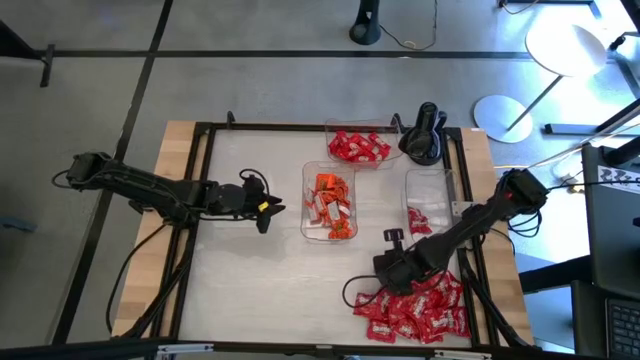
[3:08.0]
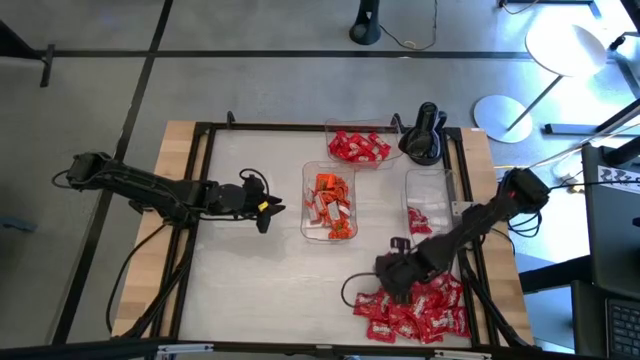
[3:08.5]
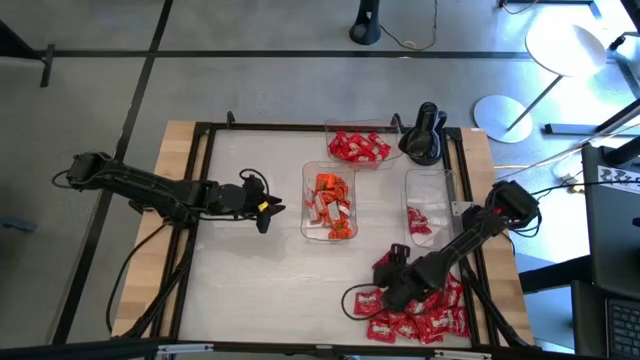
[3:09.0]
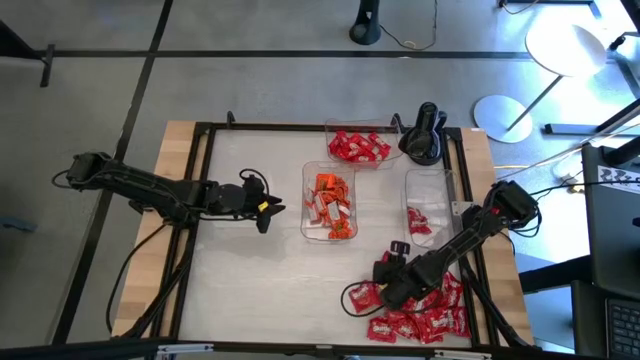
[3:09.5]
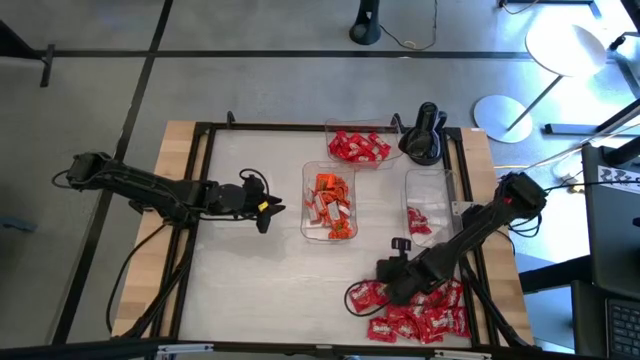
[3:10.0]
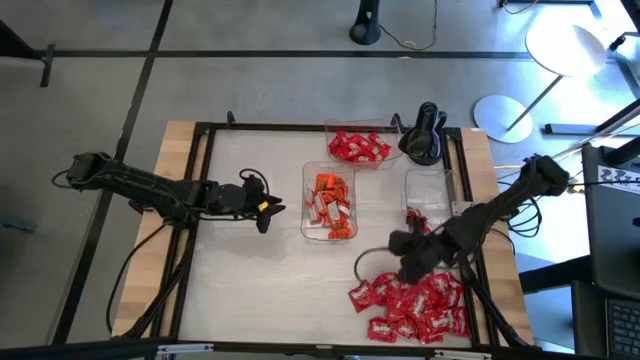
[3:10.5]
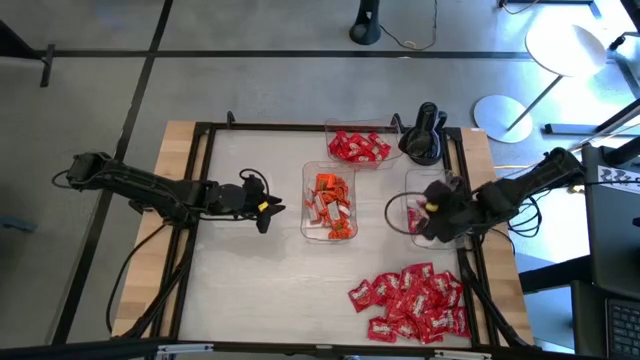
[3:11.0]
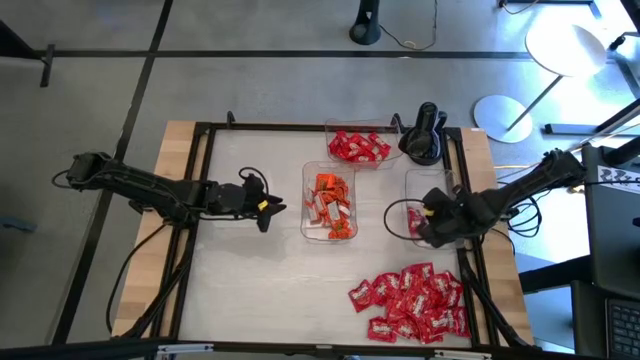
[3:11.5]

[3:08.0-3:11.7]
Task: Sort candy
Put the red candy pack into the bottom right transparent bin

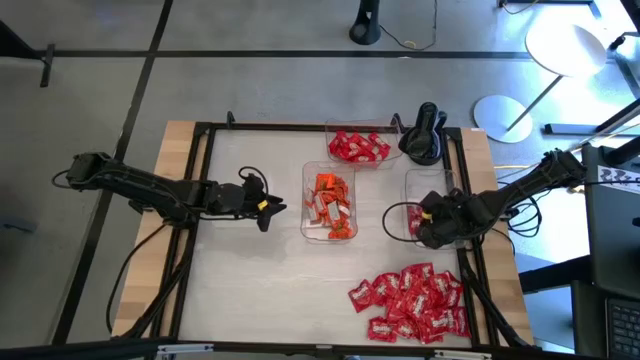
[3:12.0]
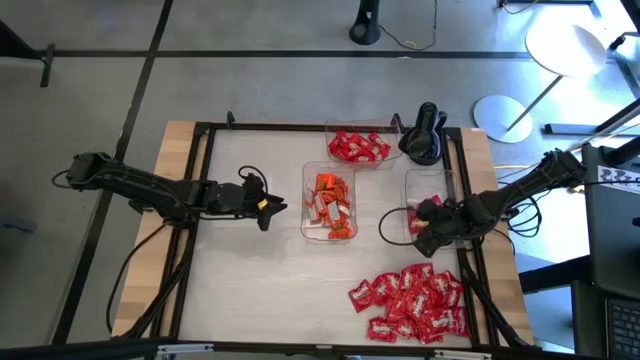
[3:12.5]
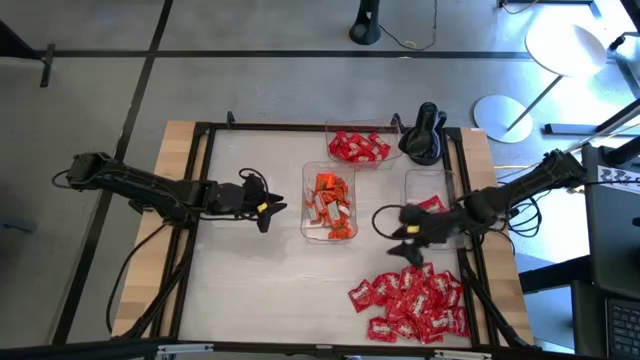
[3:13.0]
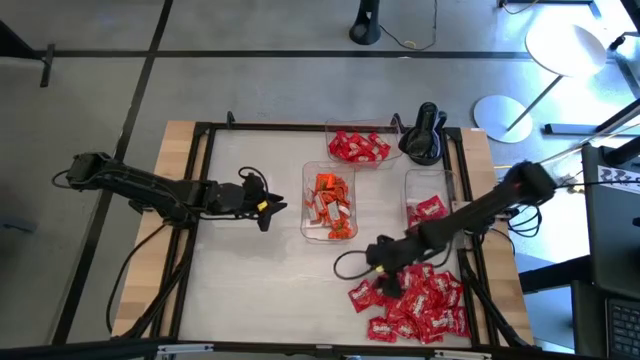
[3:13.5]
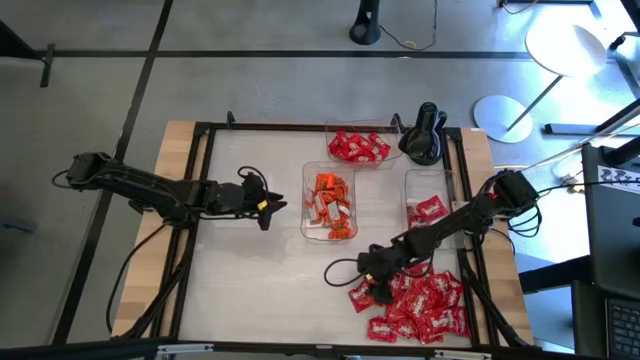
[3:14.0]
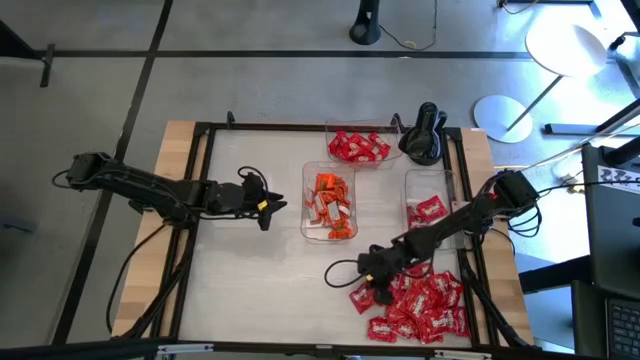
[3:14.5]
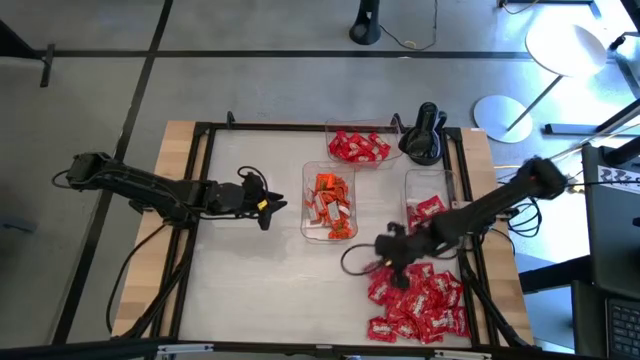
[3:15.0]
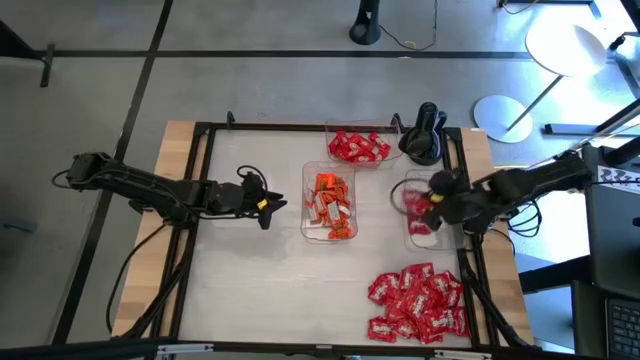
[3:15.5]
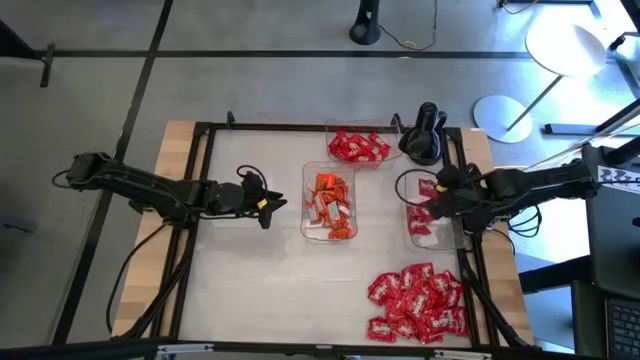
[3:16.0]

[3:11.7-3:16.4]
Put the red candy pack into the bottom right transparent bin

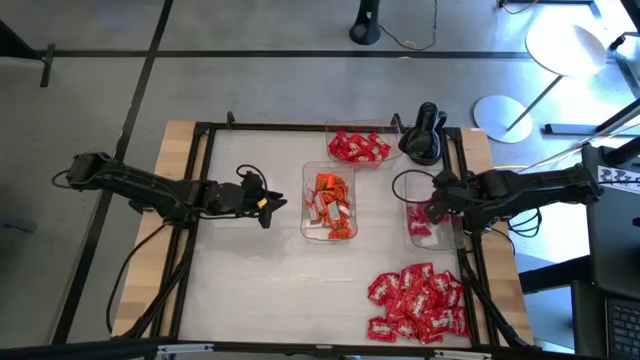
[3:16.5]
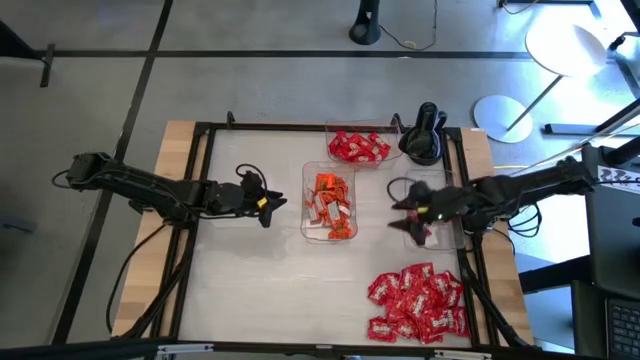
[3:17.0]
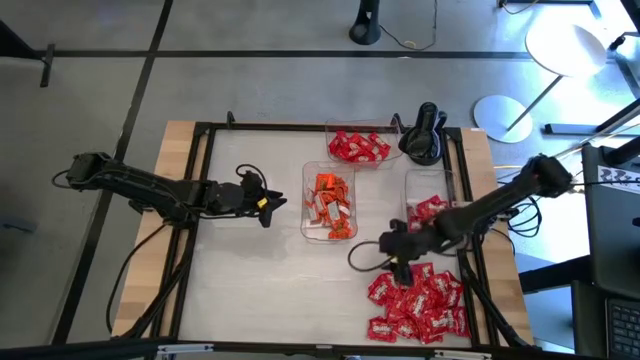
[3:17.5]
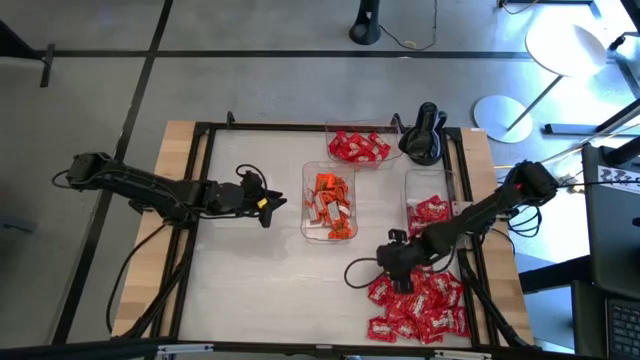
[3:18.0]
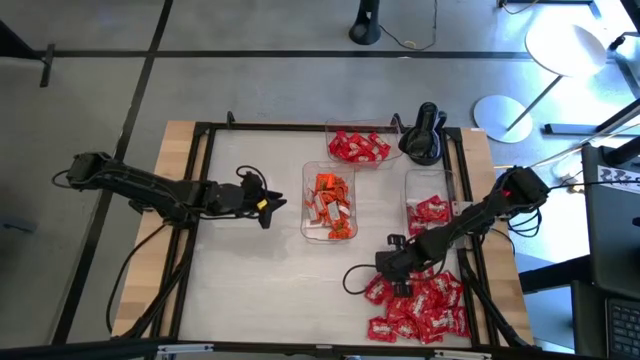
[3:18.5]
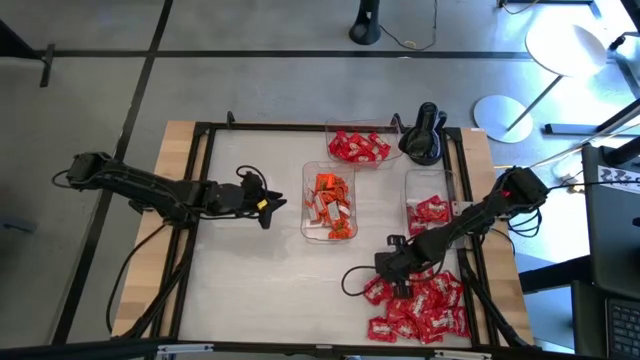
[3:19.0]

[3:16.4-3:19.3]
Put the red candy pack into the bottom right transparent bin

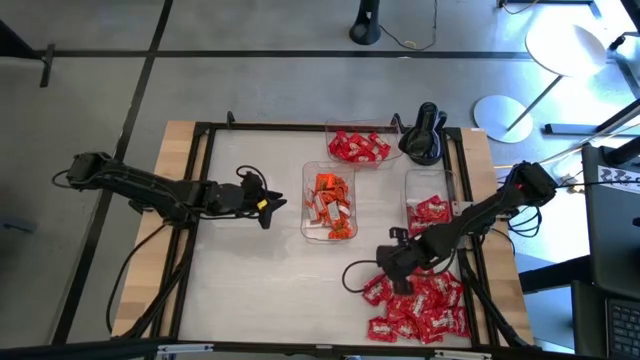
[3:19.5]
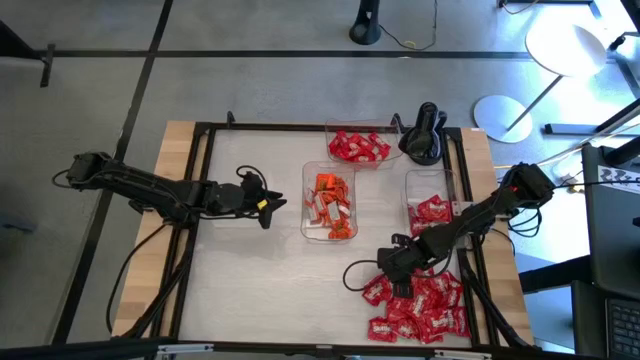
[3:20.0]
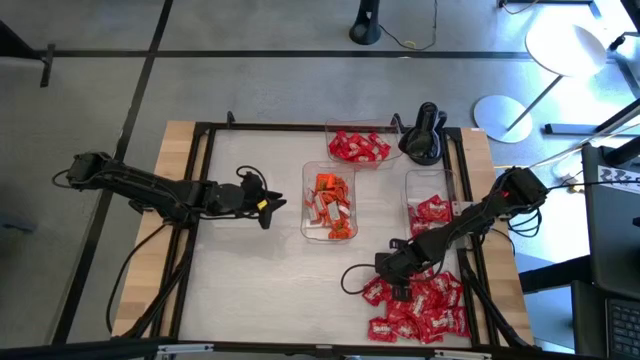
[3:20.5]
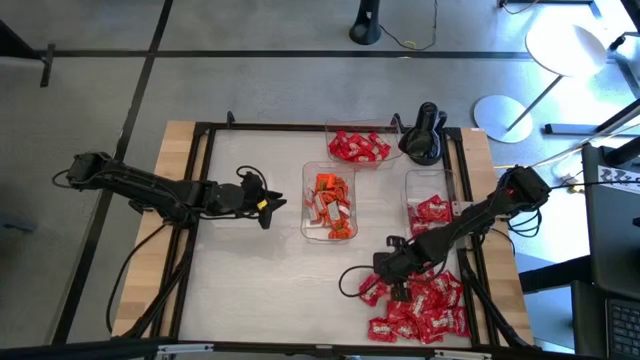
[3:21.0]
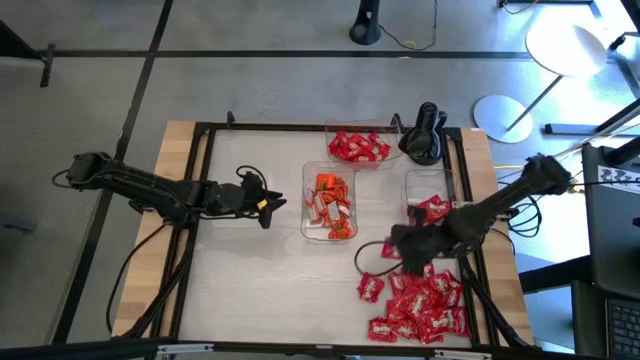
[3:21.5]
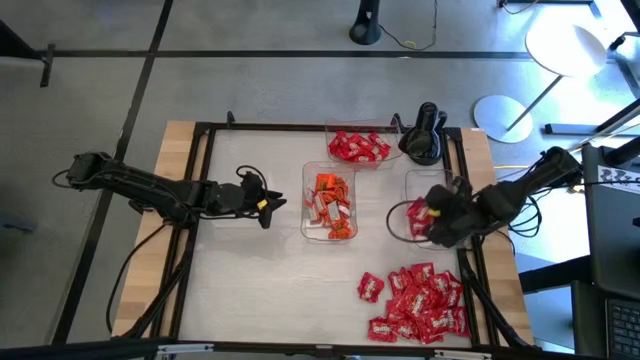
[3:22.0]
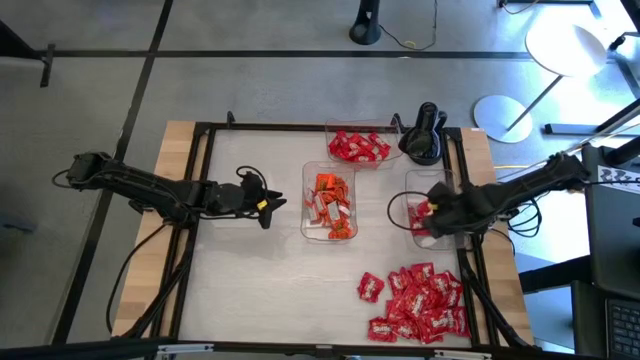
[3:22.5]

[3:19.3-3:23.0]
Put the red candy pack into the bottom right transparent bin

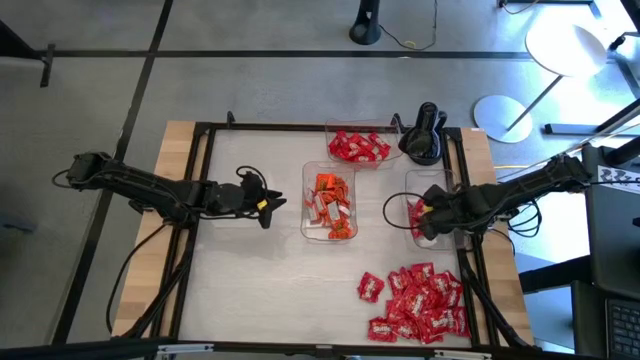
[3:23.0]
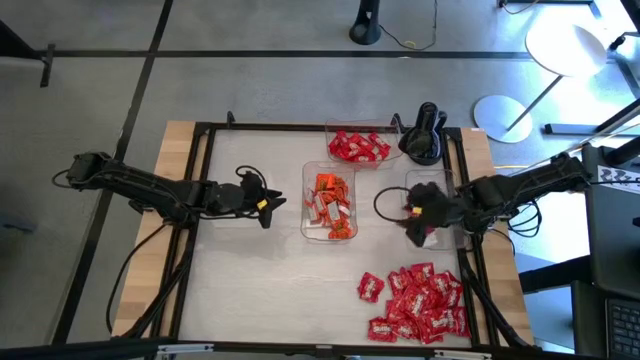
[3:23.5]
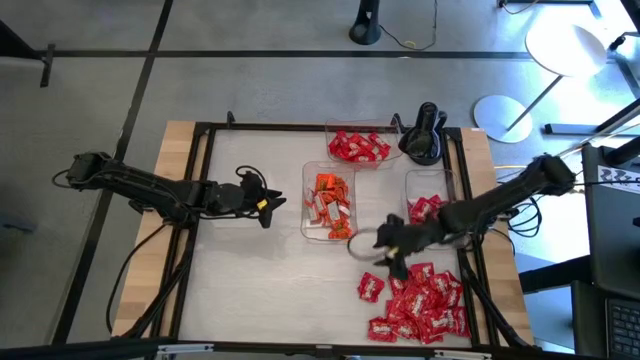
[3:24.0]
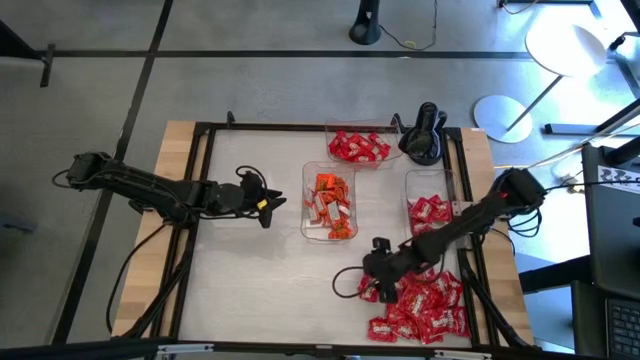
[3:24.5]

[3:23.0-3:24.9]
Put the red chocolate into the middle right transparent bin

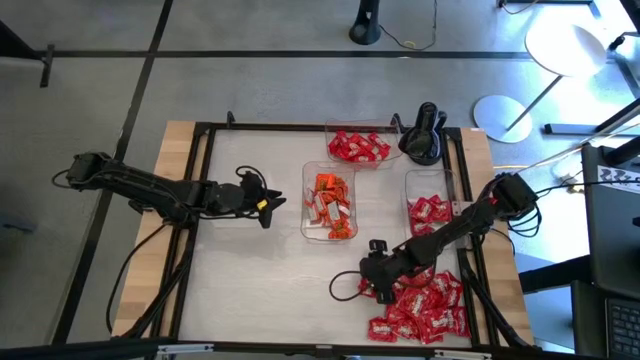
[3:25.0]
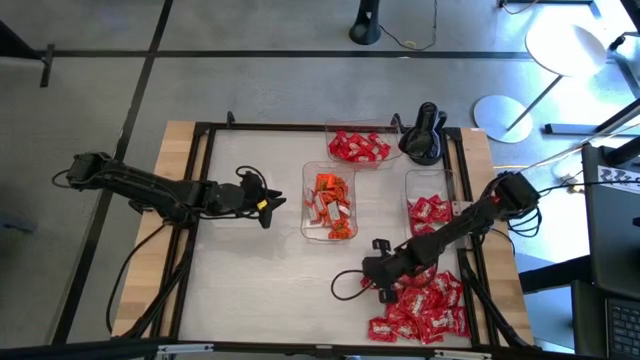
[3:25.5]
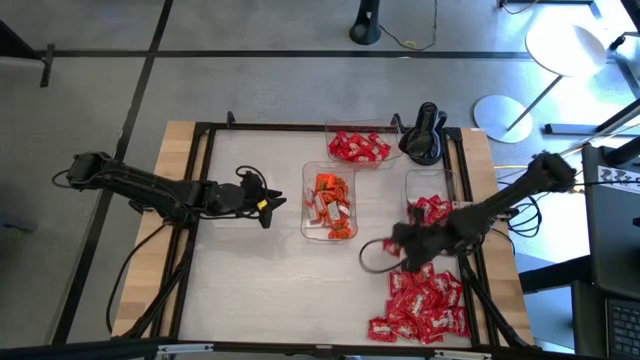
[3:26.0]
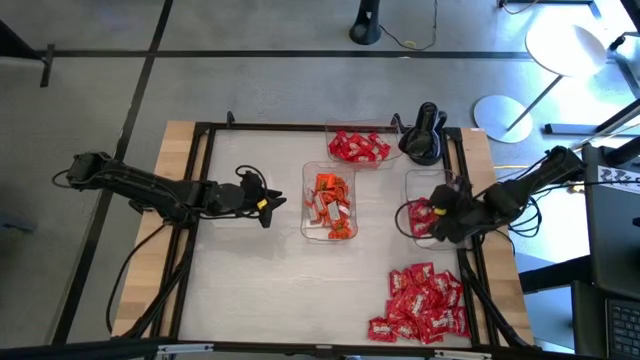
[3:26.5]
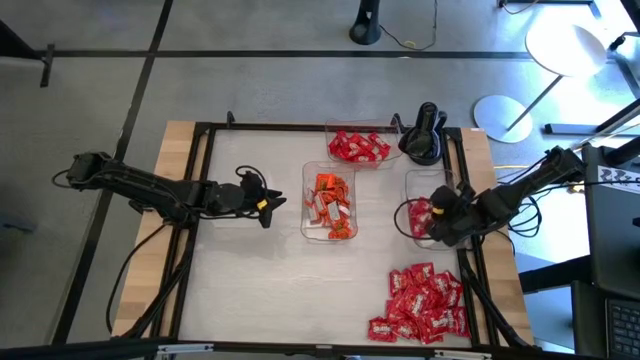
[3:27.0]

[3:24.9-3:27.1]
Put the red candy pack into the bottom right transparent bin

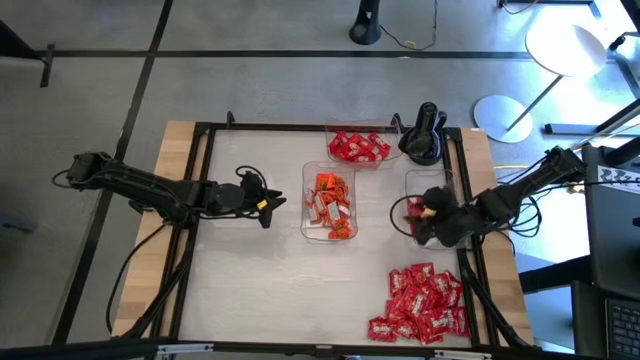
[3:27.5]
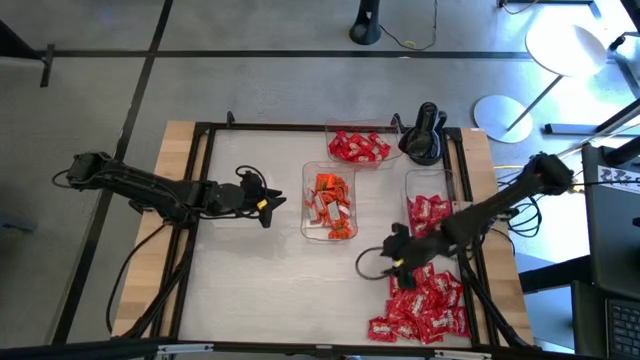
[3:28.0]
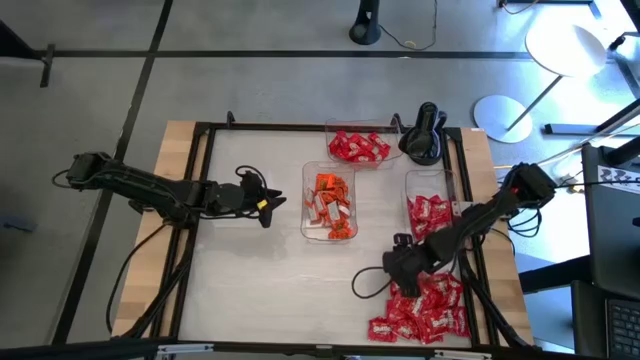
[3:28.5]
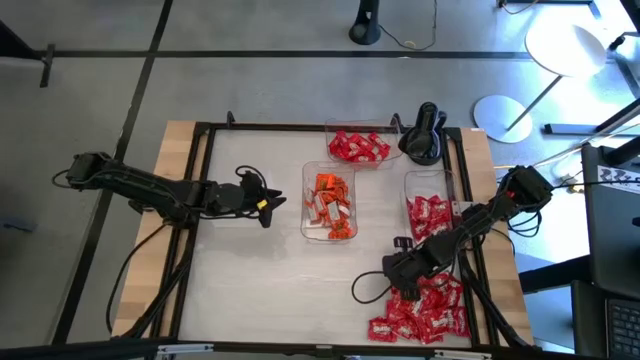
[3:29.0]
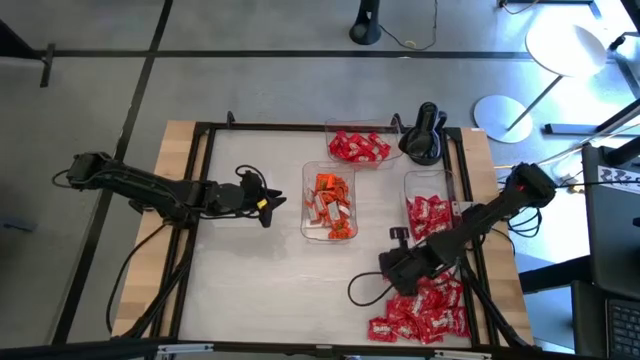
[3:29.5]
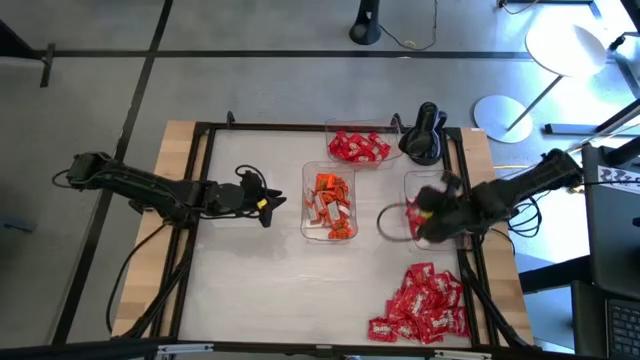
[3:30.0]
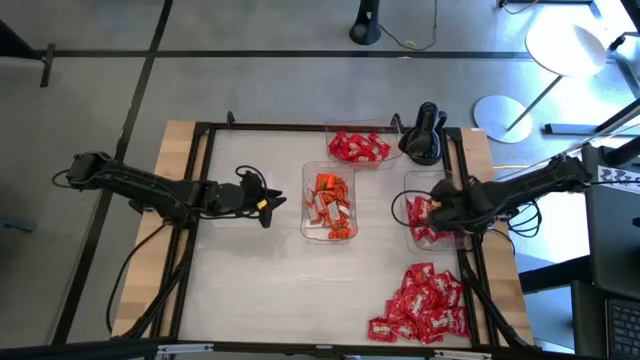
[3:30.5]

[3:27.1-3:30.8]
Put the red candy pack into the bottom right transparent bin
